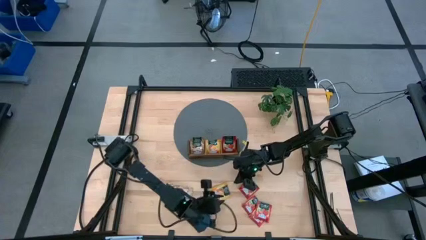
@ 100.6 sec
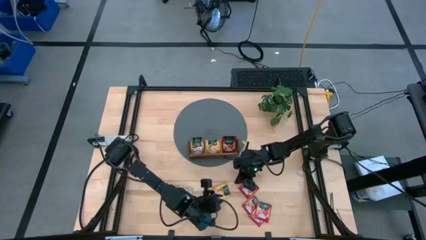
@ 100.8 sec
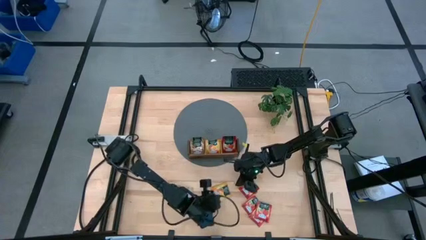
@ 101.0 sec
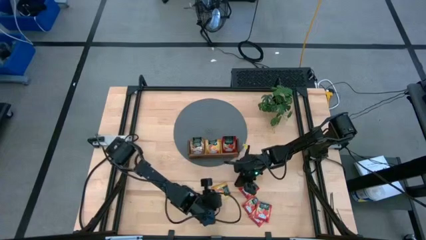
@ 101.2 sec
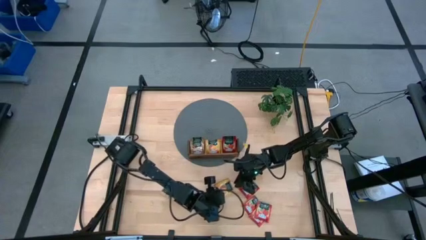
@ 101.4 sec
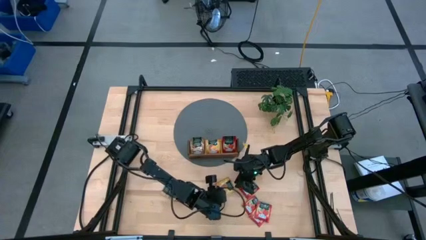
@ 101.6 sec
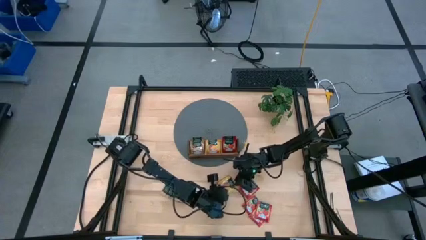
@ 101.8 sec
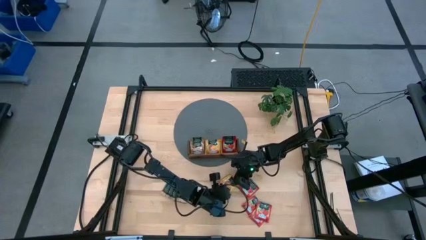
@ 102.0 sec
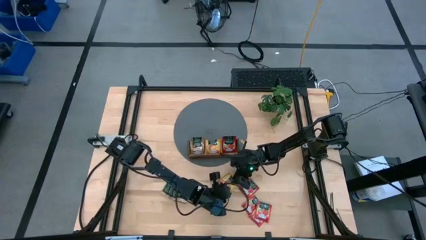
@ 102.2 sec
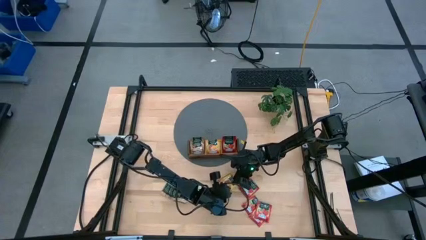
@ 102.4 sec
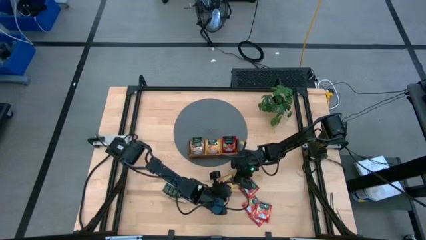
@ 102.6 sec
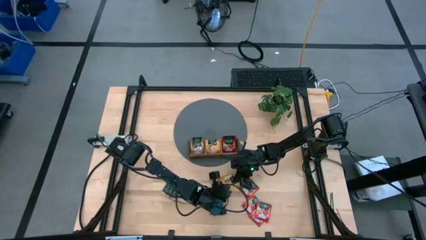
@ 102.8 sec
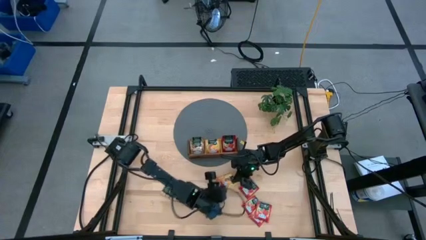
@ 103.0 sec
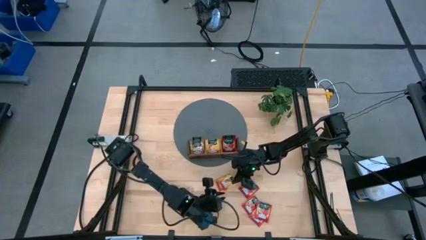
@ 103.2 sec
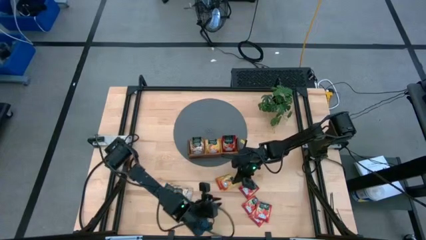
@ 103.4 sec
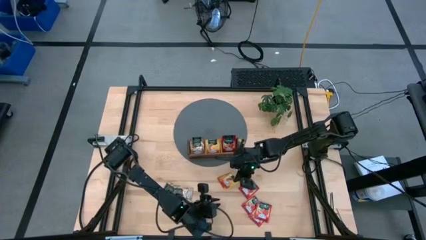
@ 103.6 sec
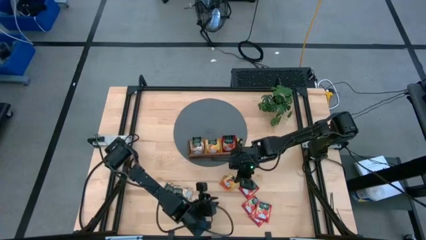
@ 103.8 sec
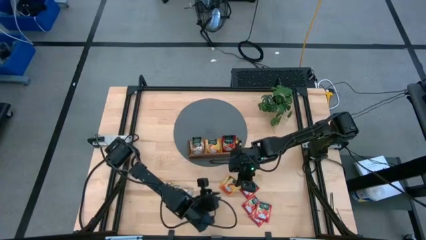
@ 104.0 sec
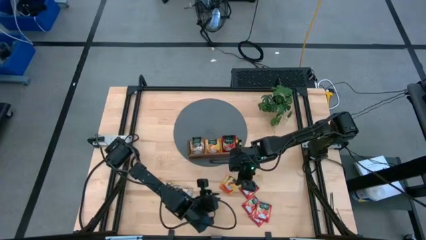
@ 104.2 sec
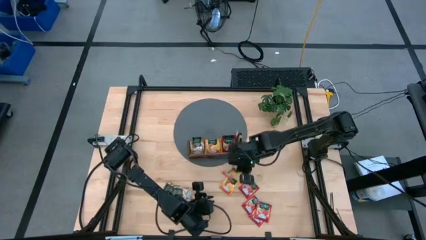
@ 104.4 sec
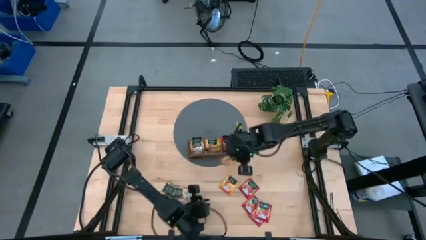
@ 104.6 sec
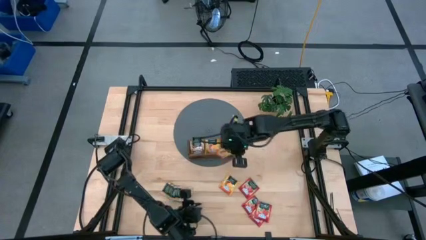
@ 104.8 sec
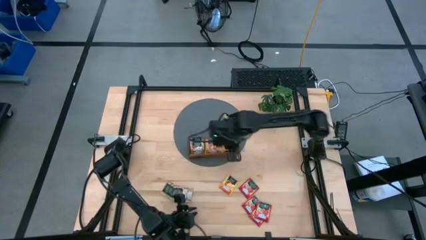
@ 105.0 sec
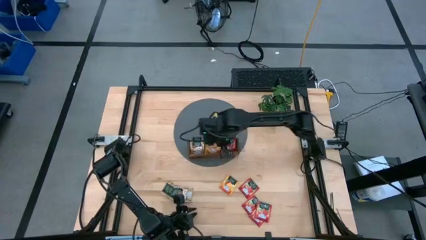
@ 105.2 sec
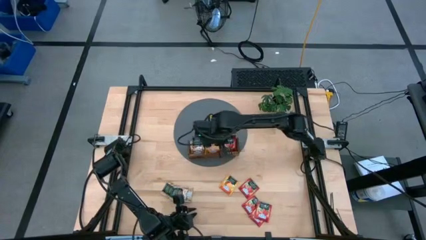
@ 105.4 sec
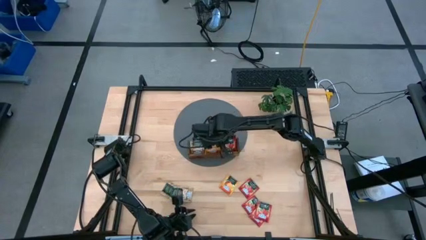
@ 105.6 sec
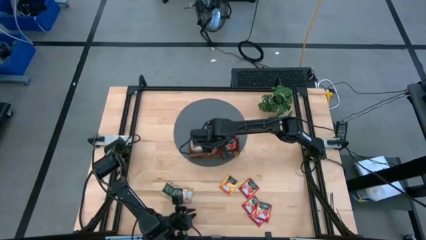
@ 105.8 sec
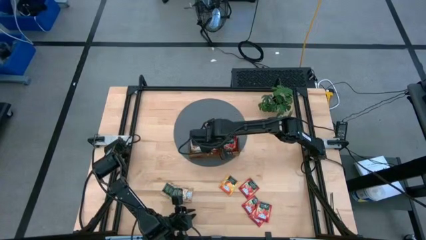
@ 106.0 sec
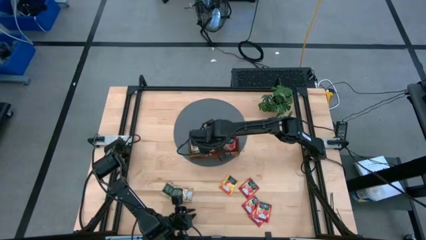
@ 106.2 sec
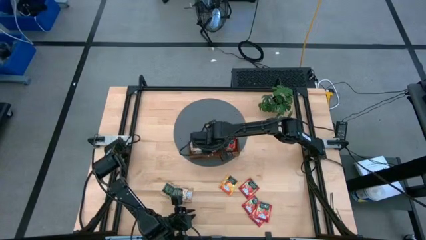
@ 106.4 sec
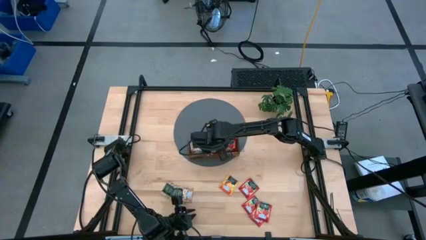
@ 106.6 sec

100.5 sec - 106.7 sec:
Task: Pick & Place Tea
Put the yellow tea bag into the middle section of the wooden organizer

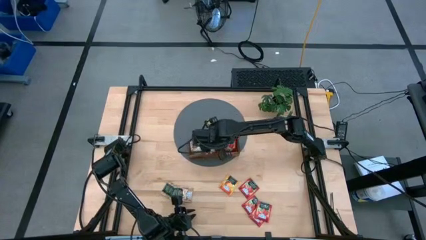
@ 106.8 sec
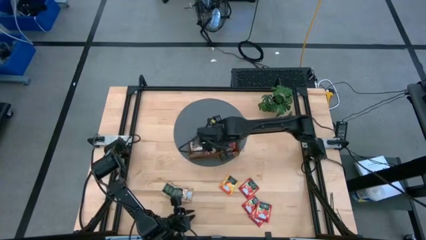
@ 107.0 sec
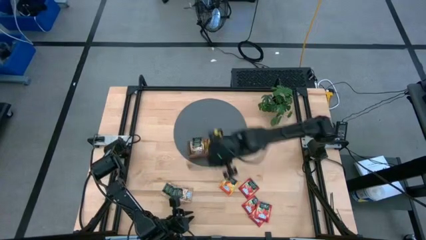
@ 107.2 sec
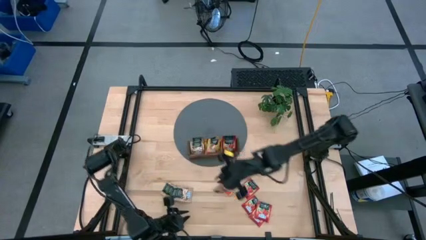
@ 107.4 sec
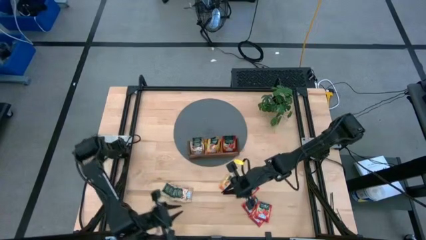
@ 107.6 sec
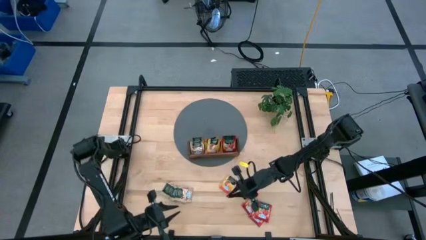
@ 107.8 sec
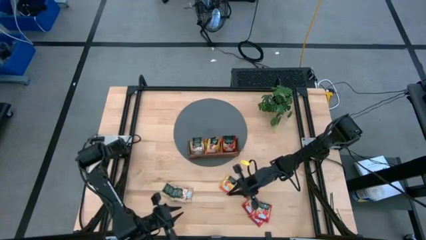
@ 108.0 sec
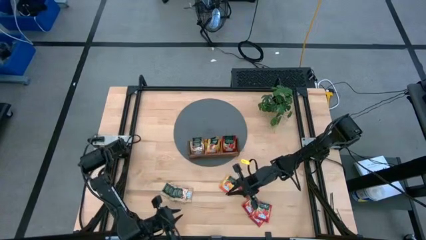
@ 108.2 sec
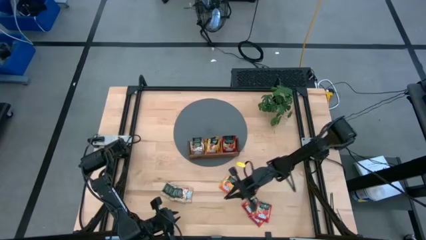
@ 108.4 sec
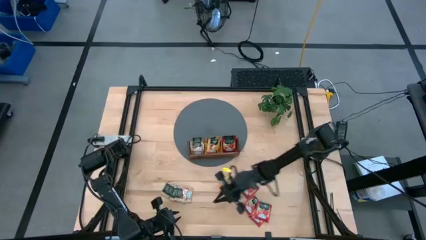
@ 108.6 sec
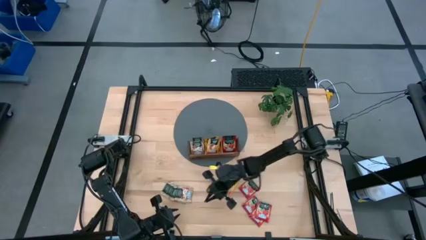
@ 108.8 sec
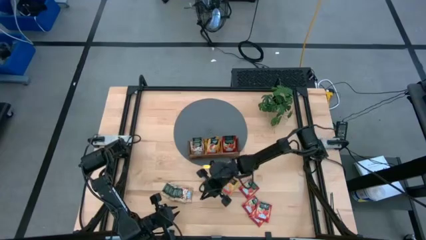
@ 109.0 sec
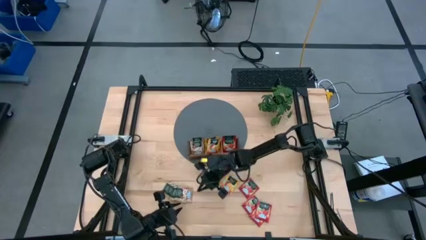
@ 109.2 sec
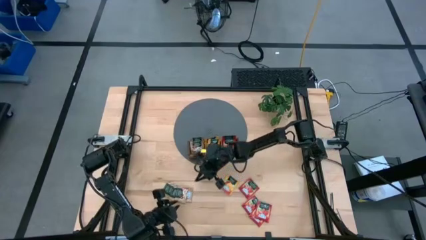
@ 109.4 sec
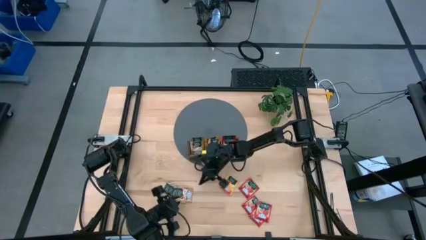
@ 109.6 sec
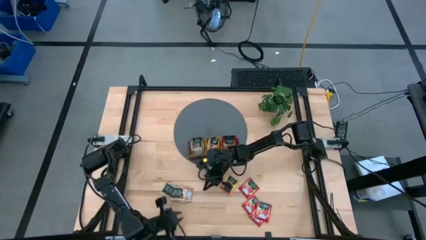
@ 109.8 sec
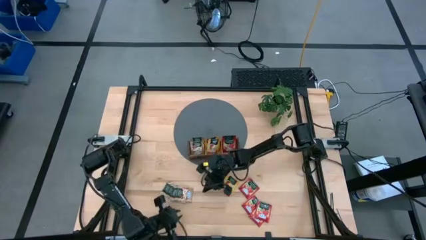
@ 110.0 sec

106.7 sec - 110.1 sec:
Put the brown tea bag into the left section of the wooden organizer
